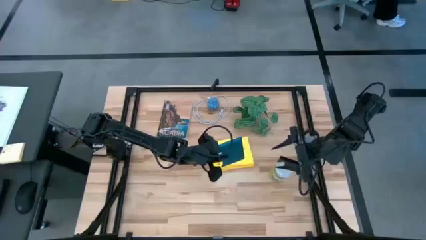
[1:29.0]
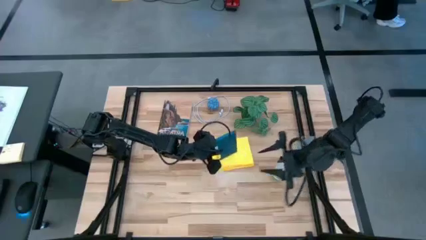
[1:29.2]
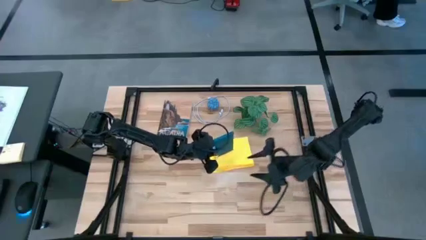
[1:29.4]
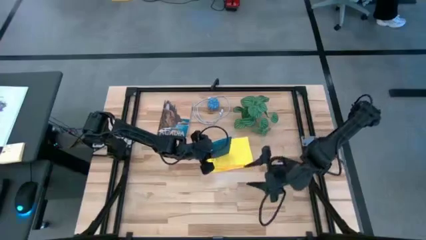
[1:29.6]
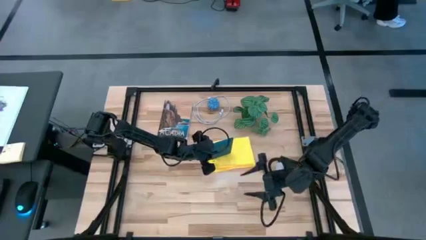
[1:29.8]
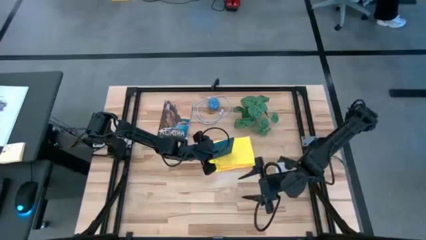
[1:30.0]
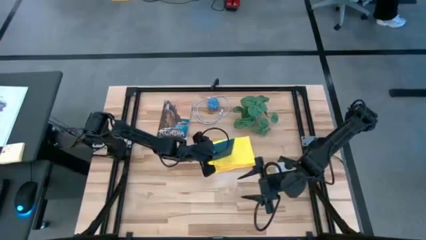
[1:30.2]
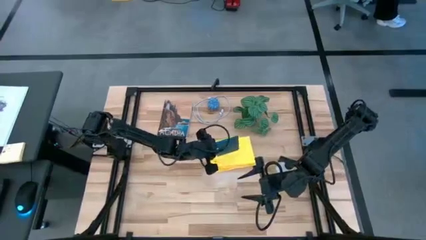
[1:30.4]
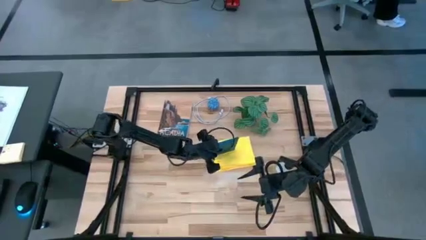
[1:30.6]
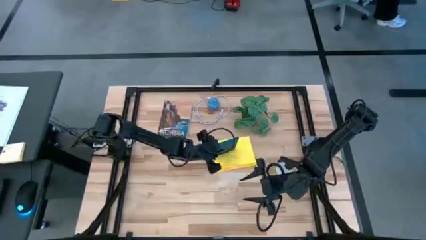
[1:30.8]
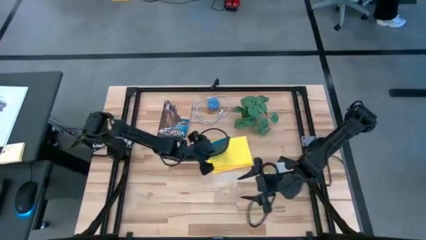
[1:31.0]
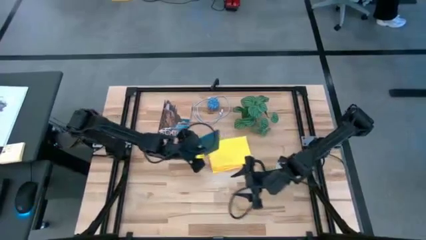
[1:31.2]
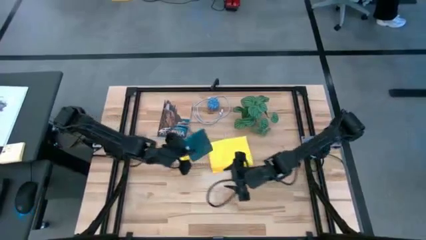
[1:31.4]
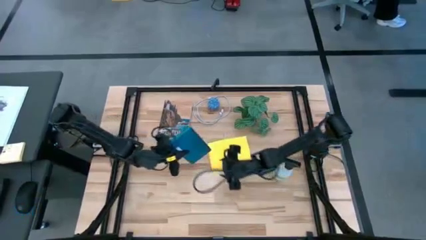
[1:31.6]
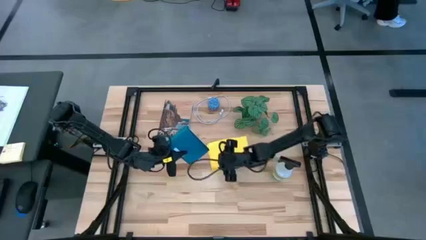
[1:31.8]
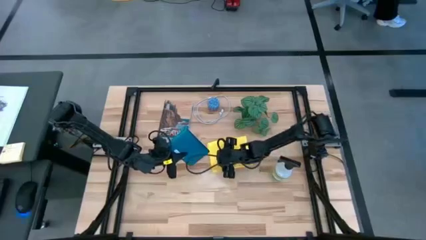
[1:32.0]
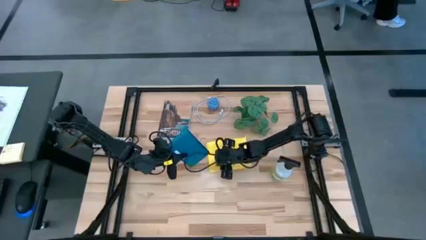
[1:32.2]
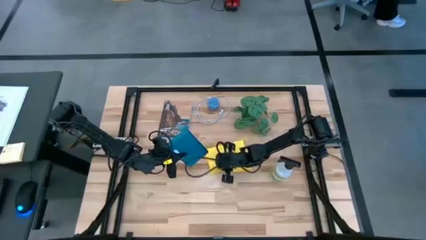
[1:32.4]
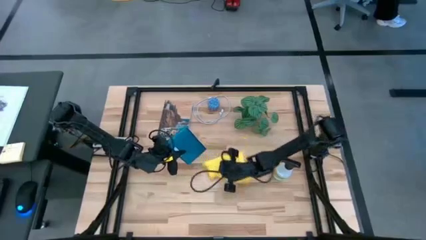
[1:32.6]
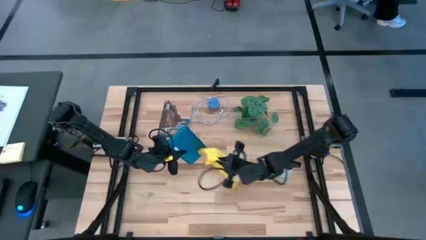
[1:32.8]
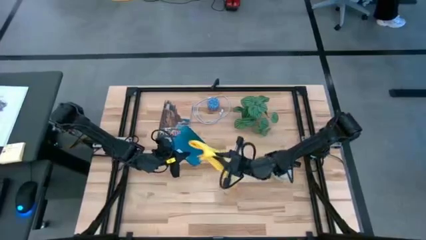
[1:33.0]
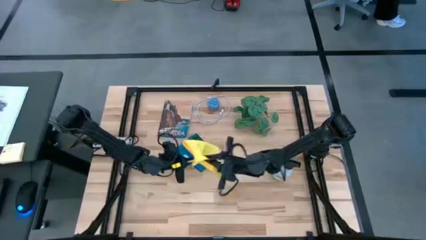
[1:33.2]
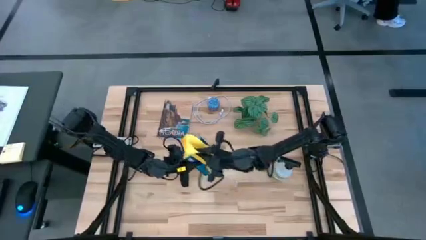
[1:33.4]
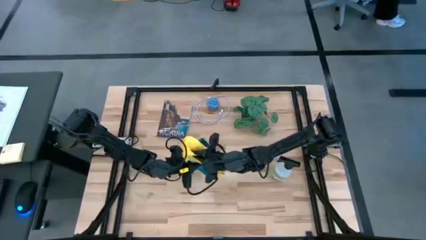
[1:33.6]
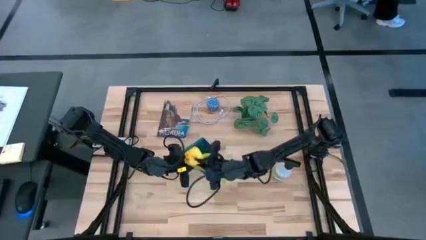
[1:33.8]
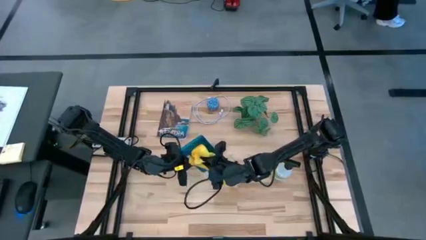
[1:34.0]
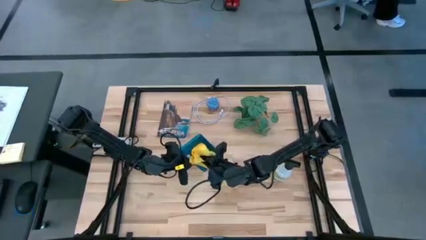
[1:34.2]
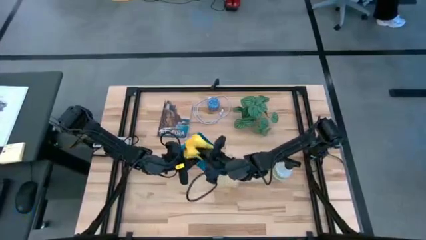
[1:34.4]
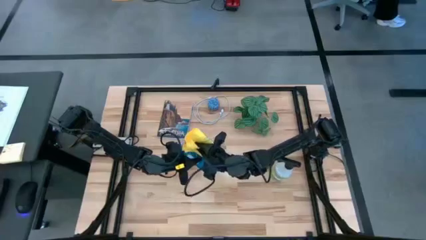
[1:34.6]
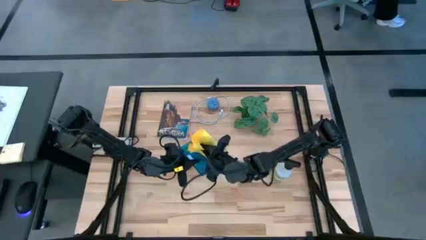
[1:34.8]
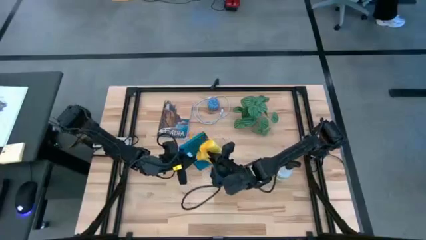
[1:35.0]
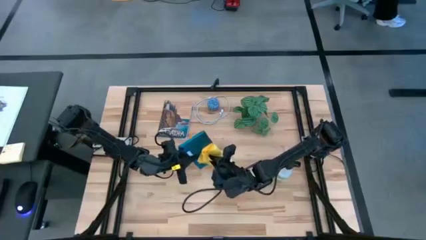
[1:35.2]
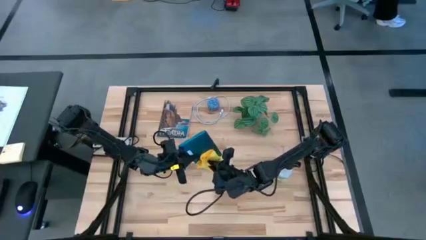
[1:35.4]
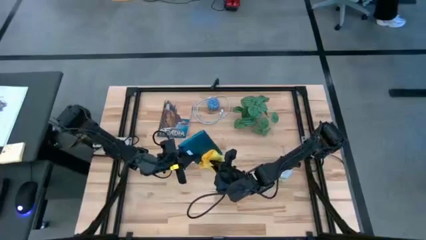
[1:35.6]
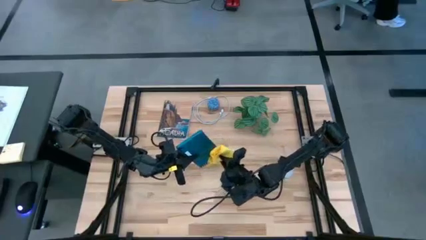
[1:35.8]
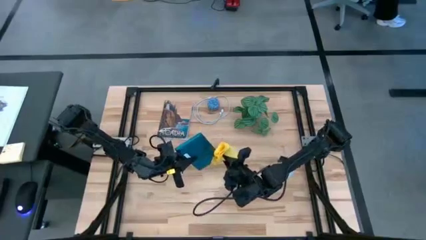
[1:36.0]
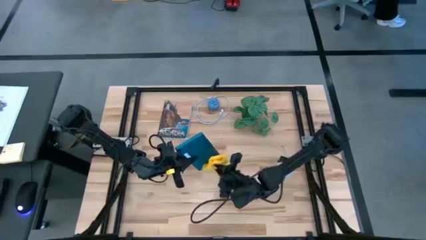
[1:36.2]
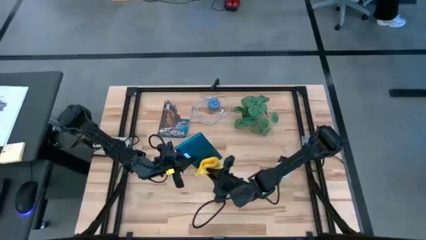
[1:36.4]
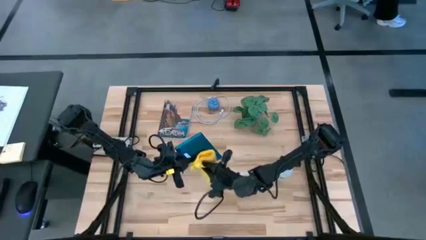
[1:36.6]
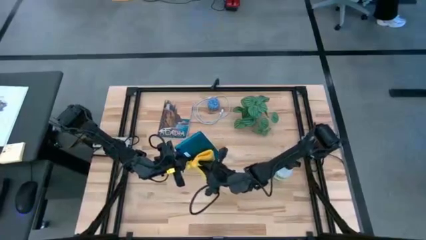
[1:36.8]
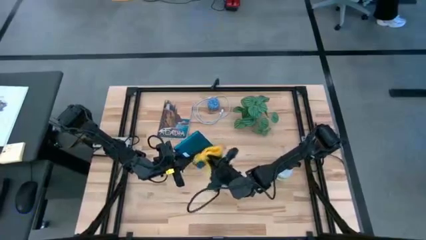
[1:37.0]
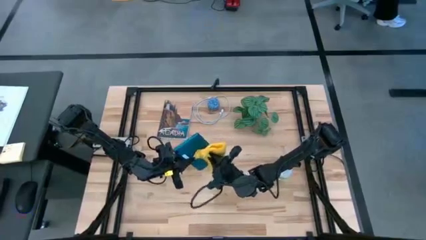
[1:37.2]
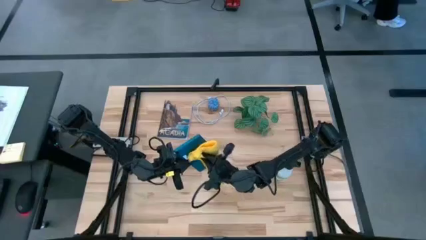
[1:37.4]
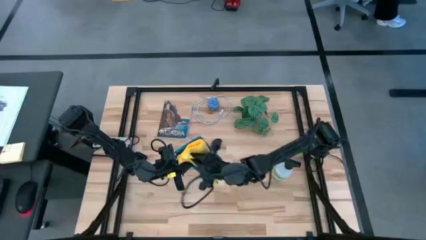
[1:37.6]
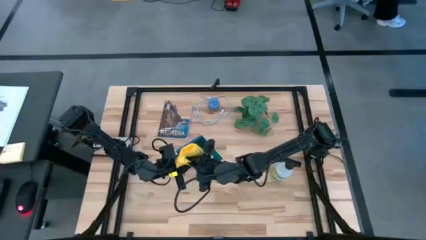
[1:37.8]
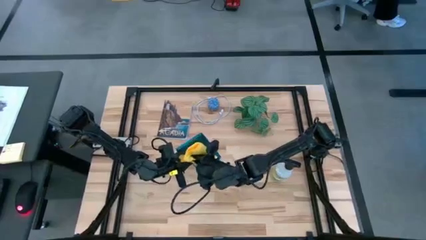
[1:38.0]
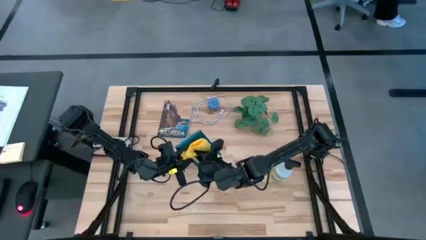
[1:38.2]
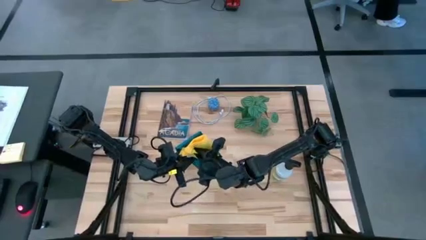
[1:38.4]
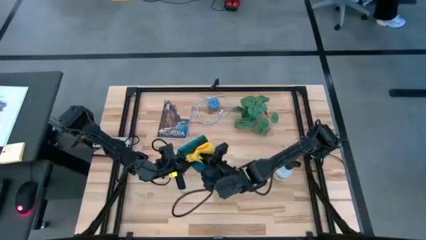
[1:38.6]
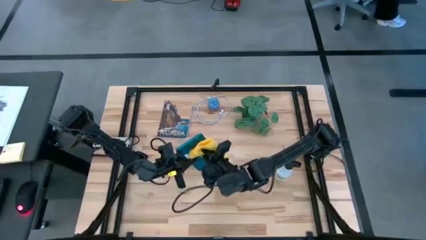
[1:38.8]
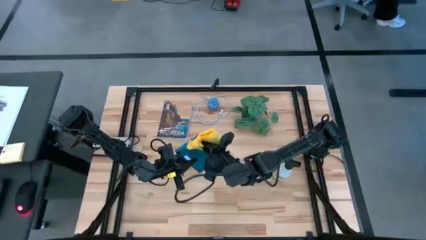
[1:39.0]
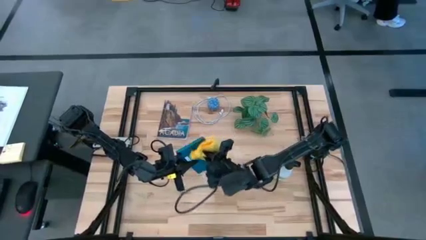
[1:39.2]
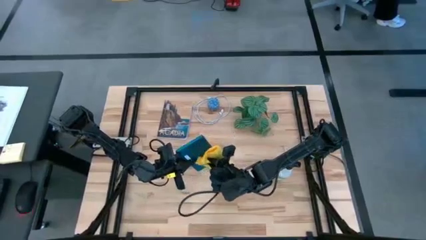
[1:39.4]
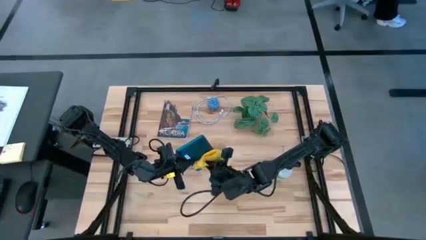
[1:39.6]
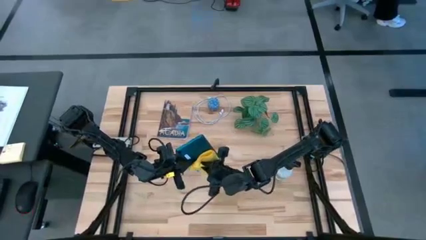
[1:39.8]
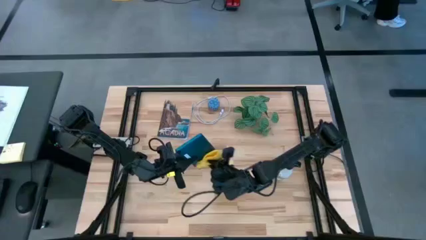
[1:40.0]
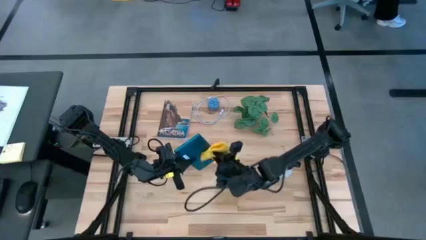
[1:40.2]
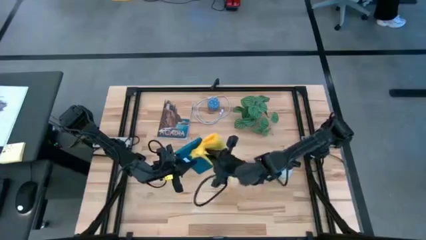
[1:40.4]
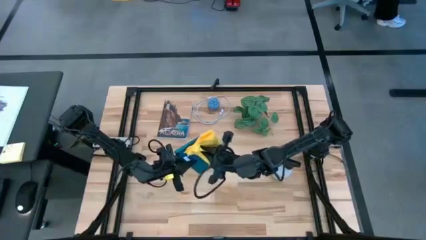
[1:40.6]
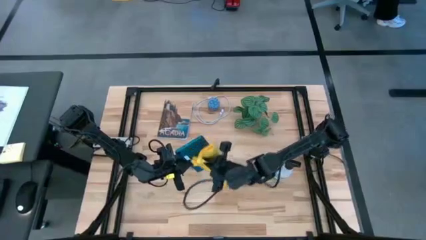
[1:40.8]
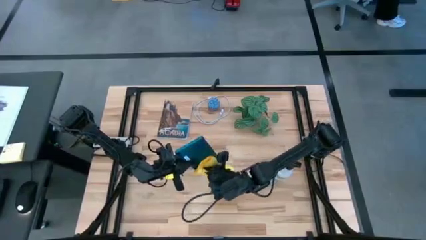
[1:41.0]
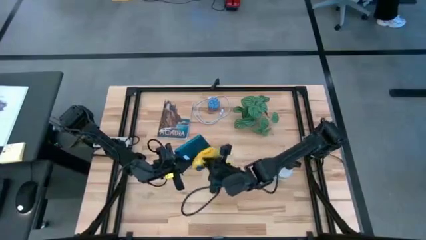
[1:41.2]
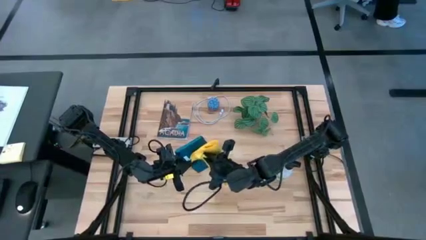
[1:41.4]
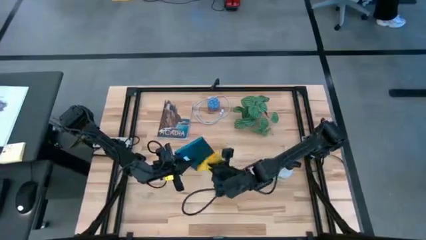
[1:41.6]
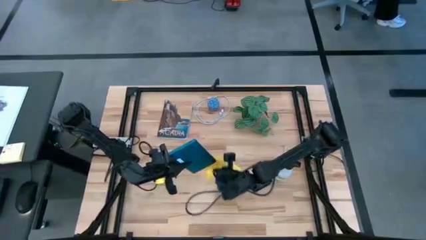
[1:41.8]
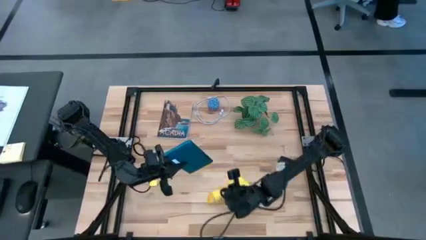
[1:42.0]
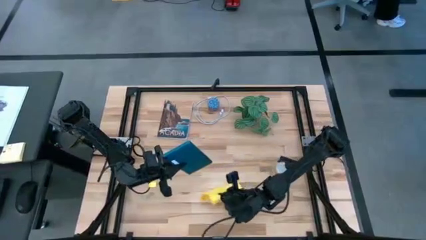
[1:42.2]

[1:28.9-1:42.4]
Task: Apply microfiber cloth
Wipe the blue tablet with the microfiber cloth
